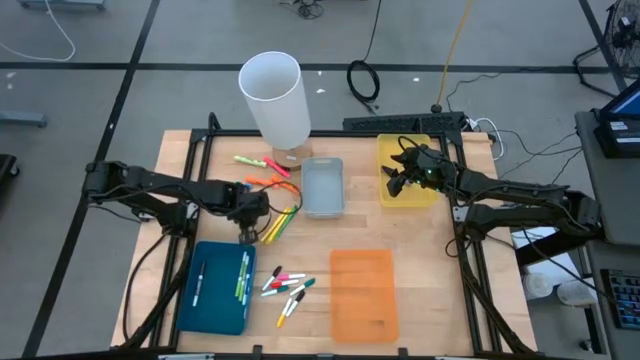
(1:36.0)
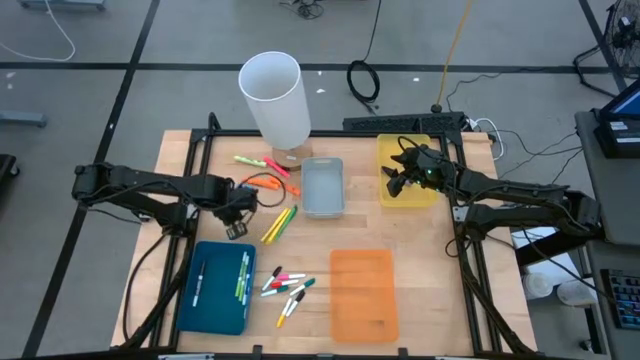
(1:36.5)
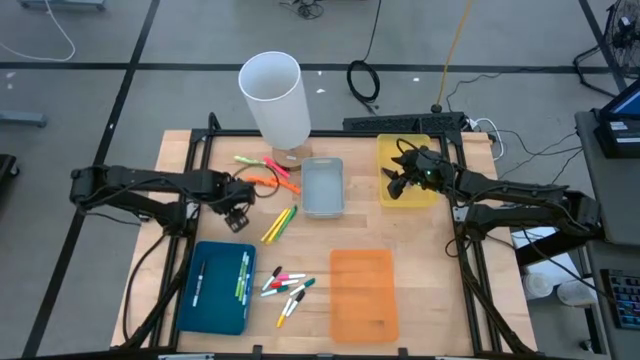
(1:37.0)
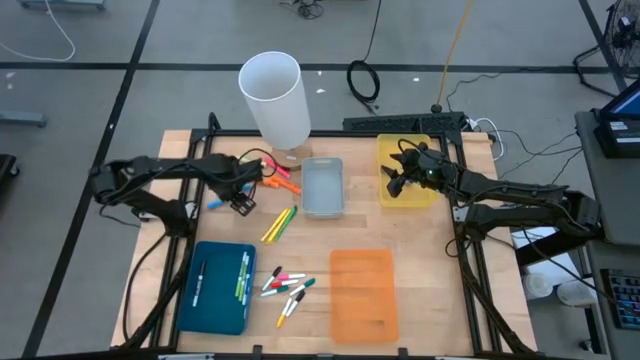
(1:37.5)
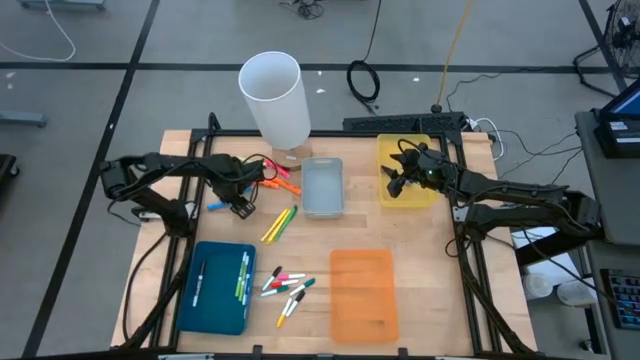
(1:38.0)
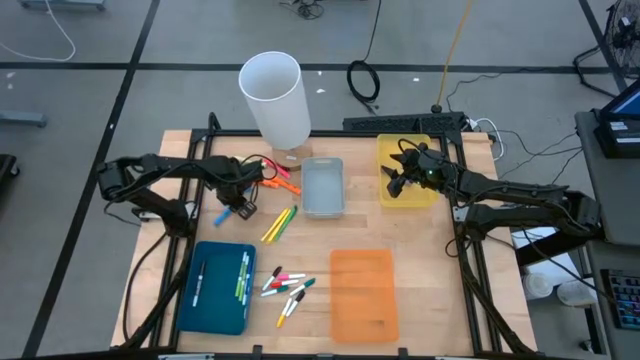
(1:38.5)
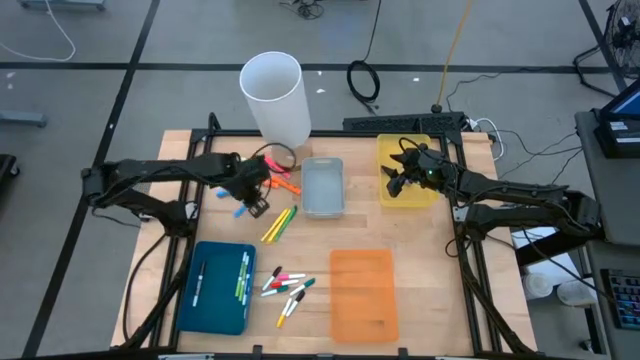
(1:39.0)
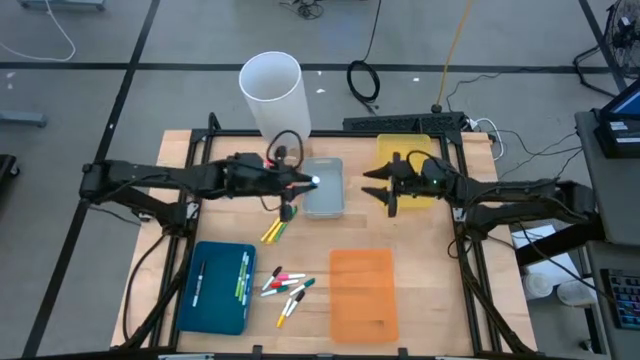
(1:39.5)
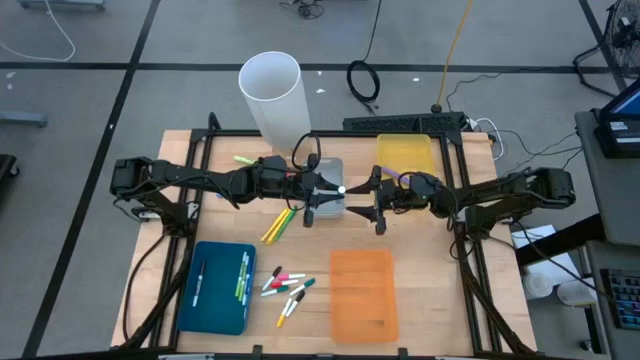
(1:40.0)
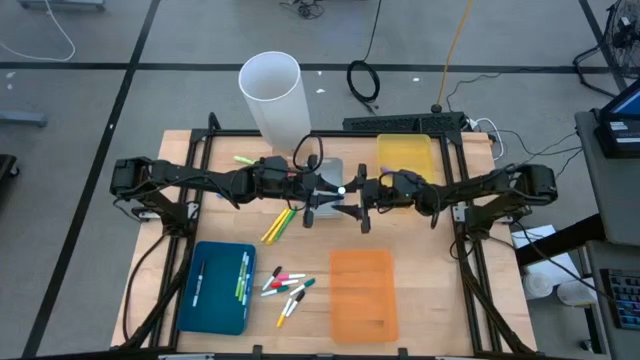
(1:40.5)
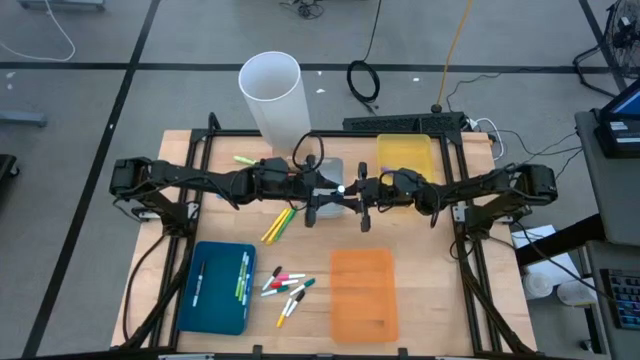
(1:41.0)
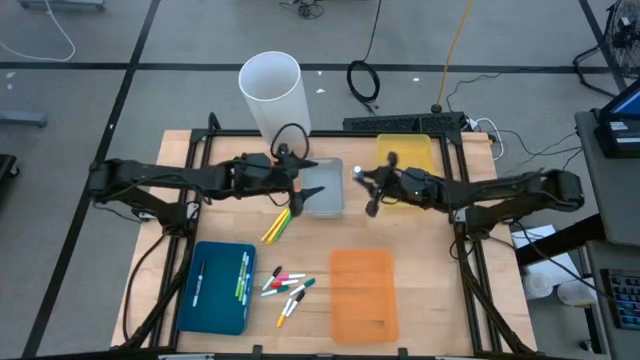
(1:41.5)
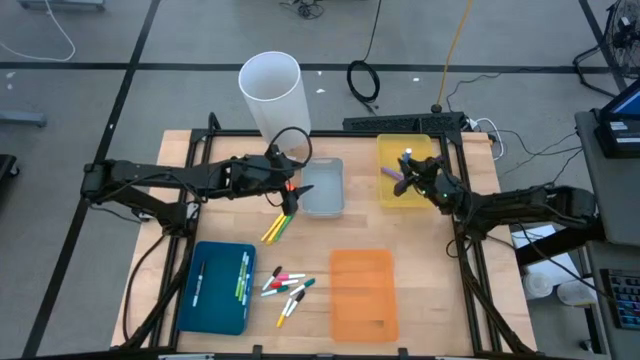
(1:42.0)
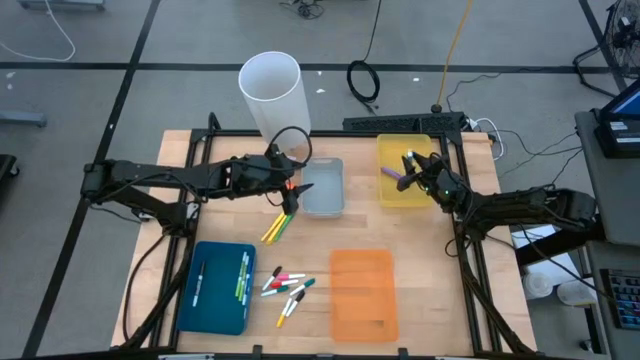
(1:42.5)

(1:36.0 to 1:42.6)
Task: Pick & Place Markers
Put the bottom large blue highlighter pen in the yellow bin

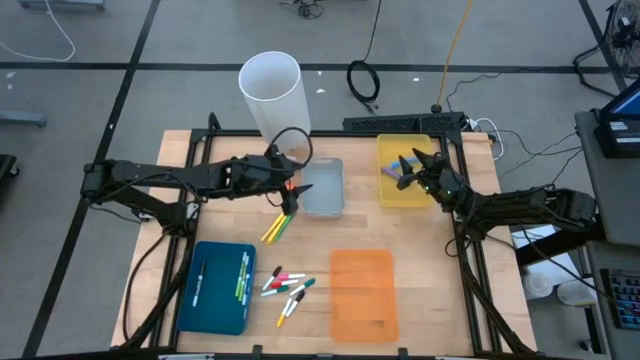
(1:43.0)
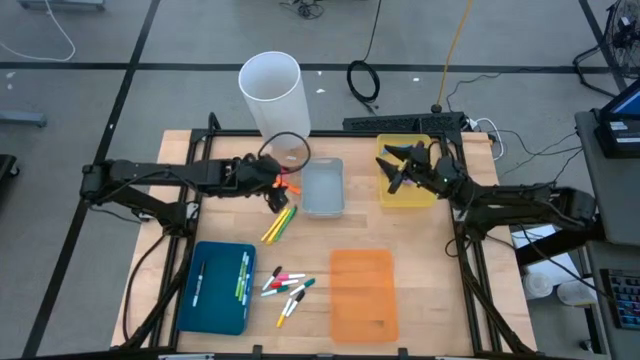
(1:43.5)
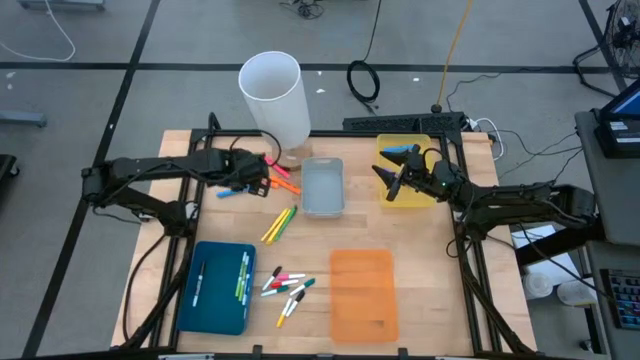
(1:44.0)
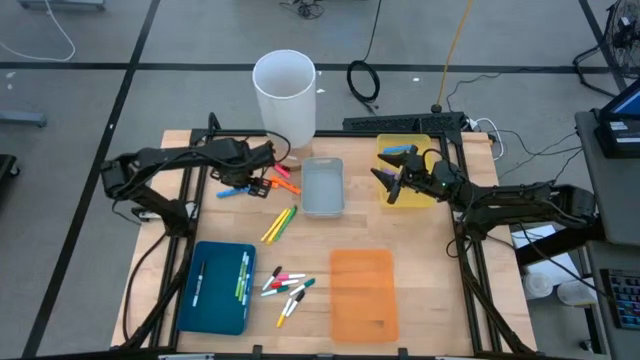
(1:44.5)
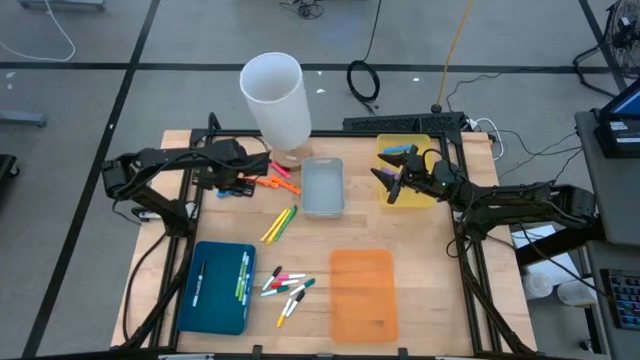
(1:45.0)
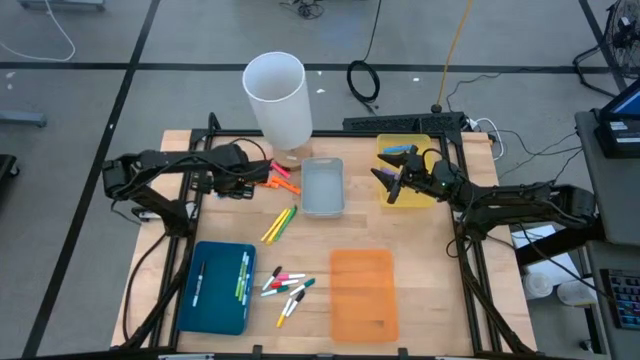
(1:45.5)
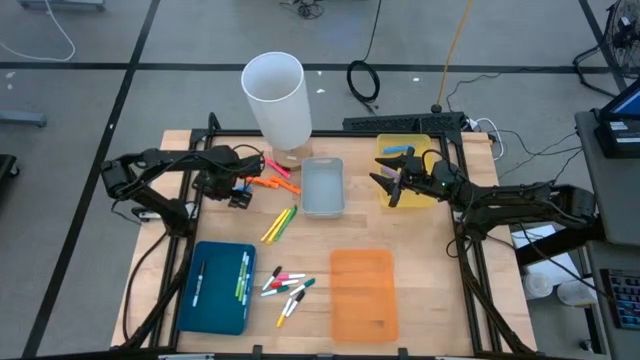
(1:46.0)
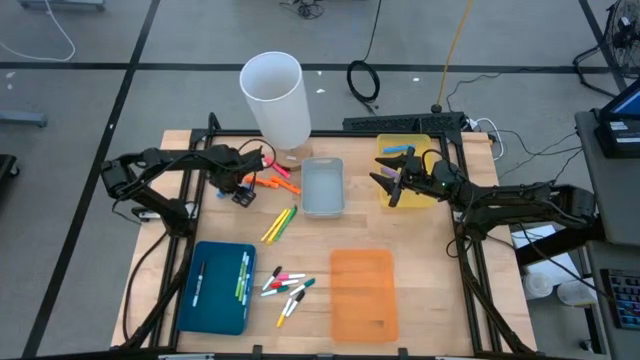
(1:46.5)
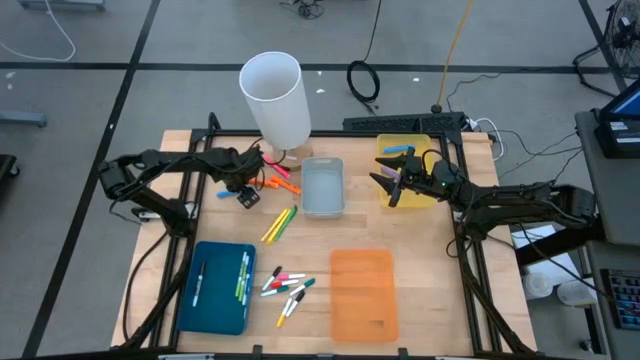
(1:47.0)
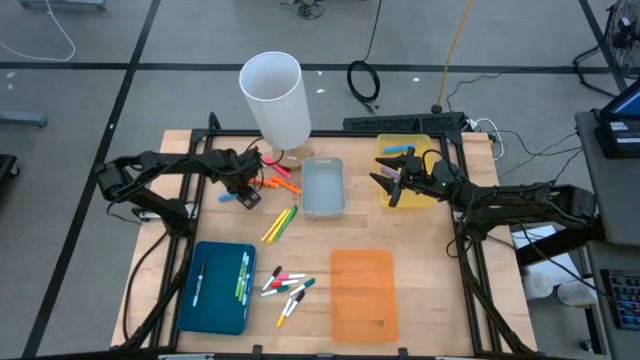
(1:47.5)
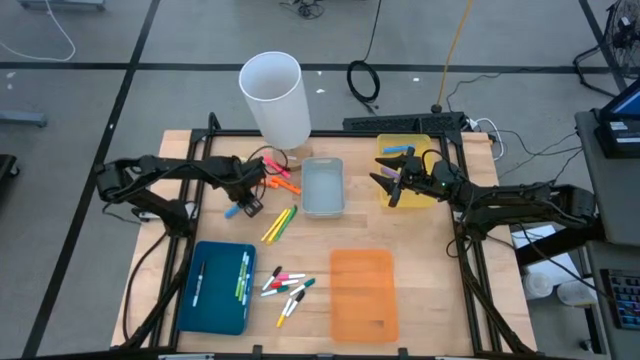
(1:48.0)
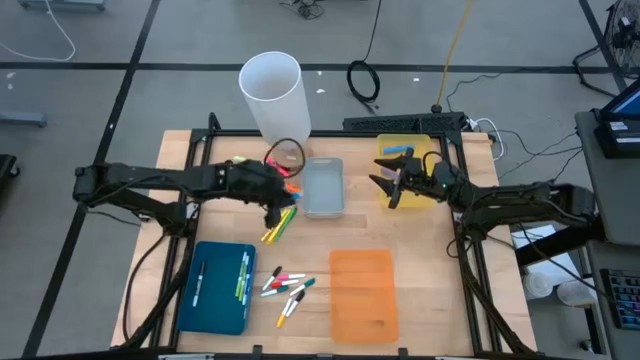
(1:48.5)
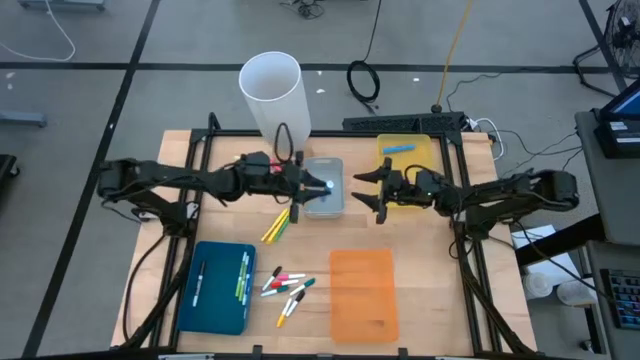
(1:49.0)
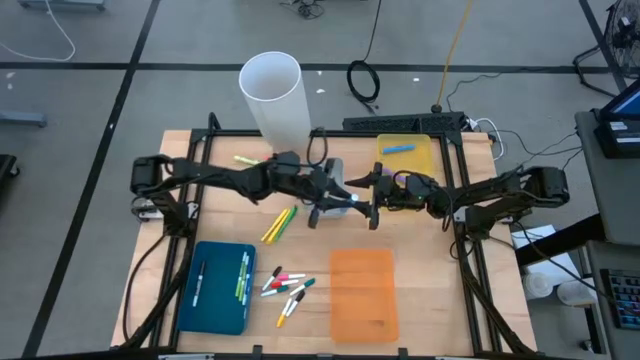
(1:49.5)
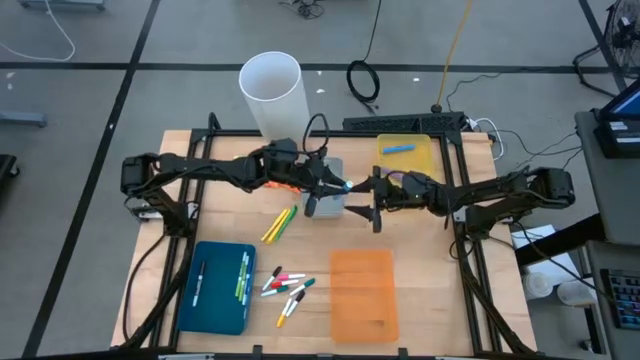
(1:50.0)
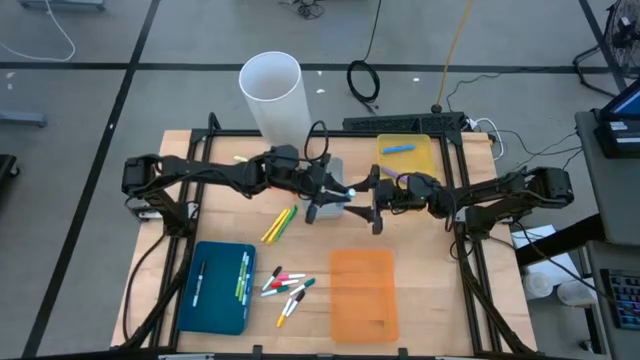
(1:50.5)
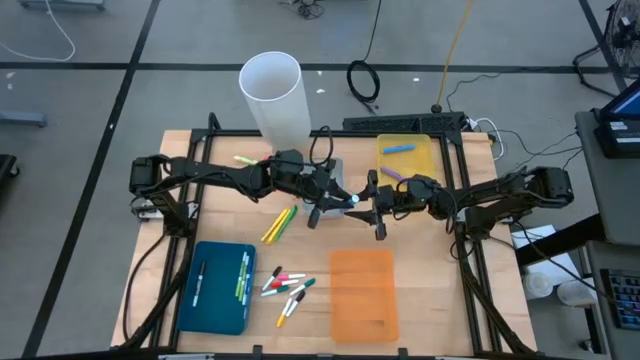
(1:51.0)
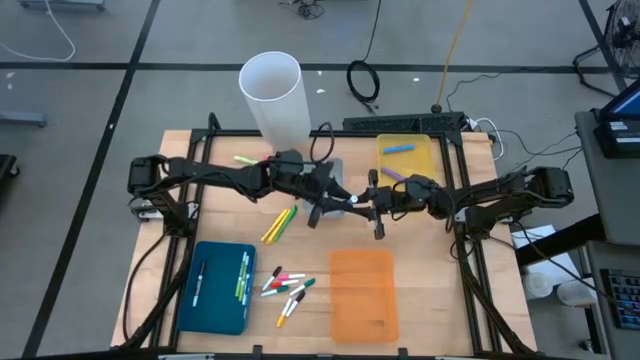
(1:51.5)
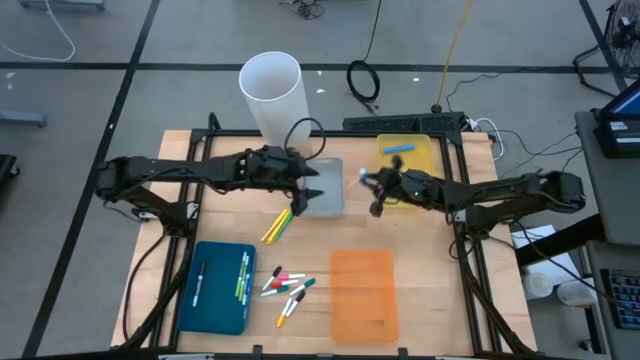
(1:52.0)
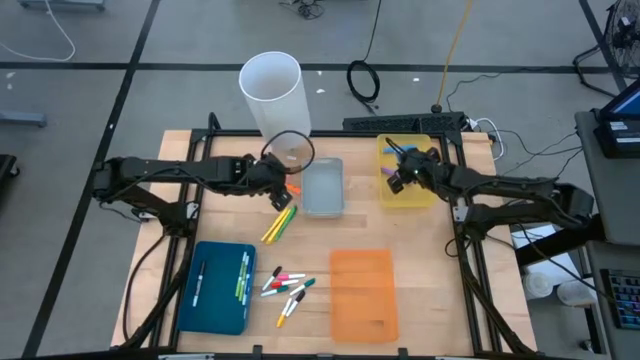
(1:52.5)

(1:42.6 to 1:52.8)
Put the large blue highlighter pen in the yellow bin

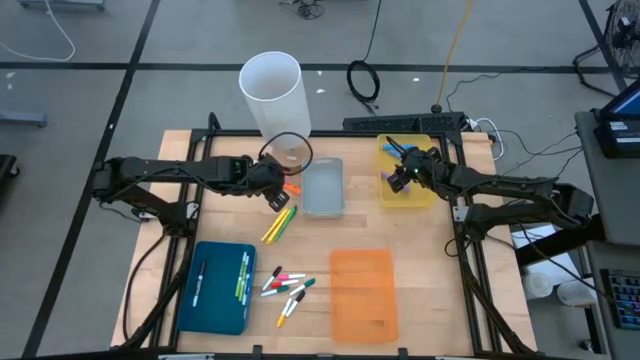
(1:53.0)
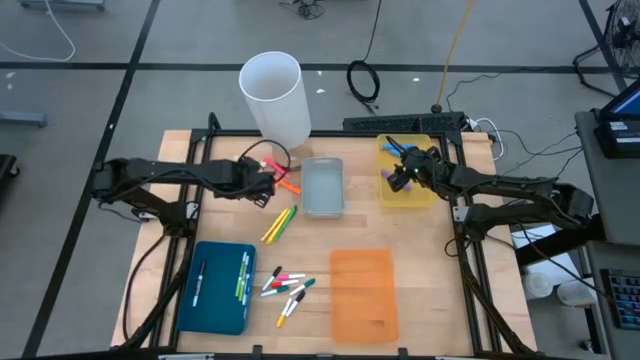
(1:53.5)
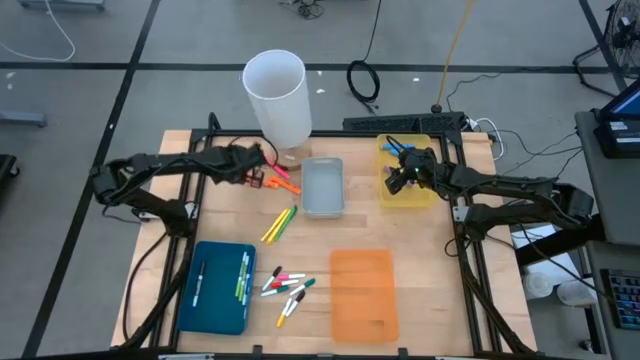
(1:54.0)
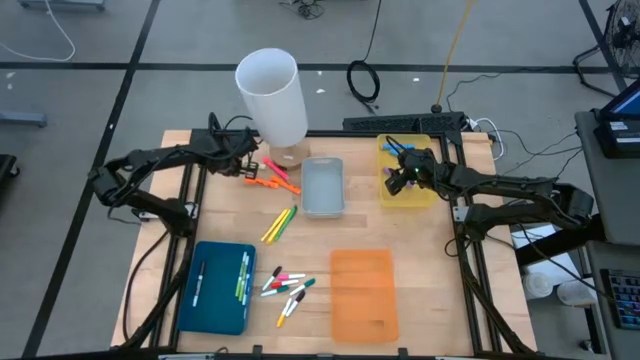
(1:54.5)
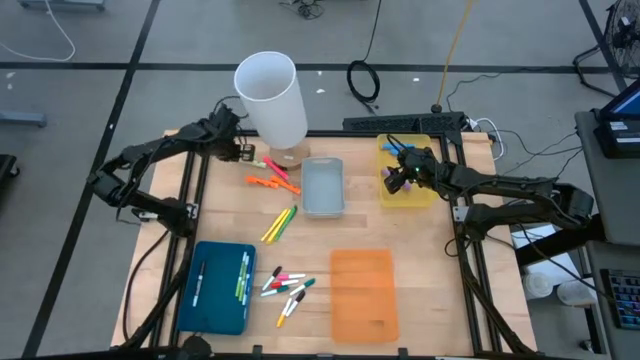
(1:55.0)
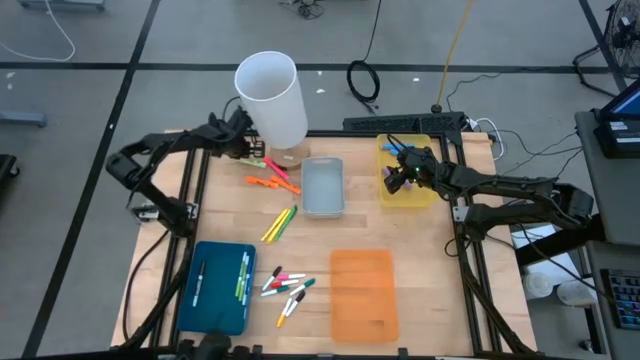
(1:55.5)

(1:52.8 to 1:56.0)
Adjust the green highlighter pen

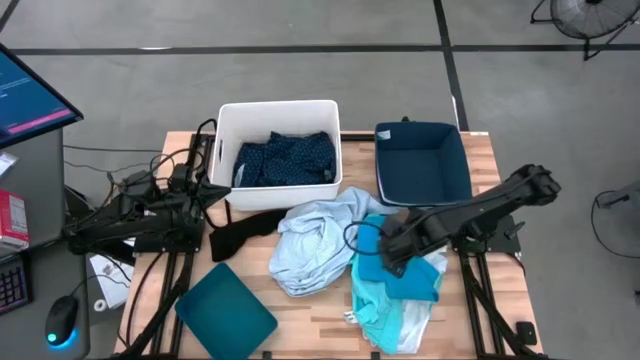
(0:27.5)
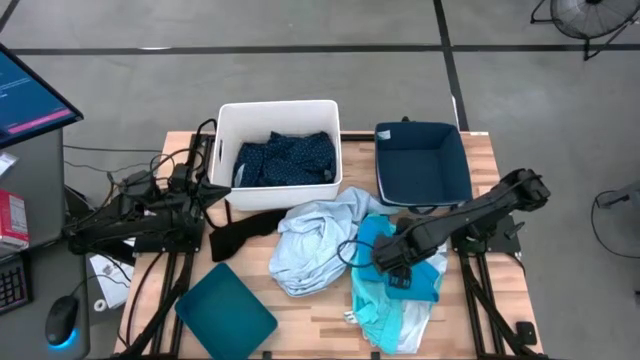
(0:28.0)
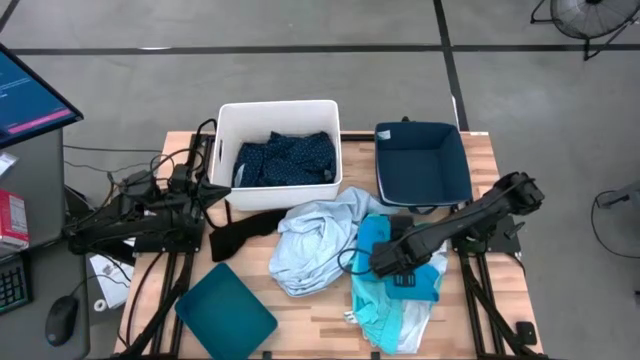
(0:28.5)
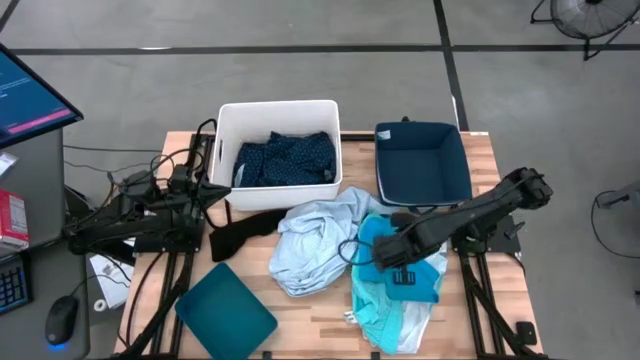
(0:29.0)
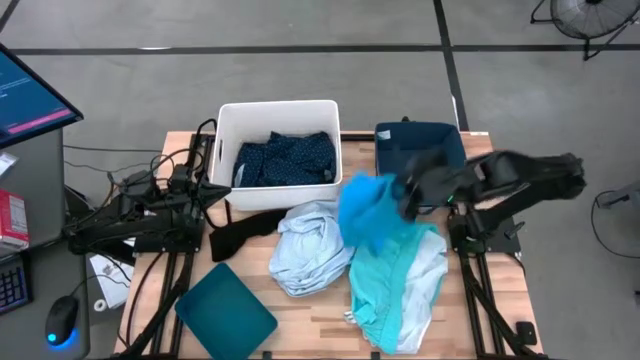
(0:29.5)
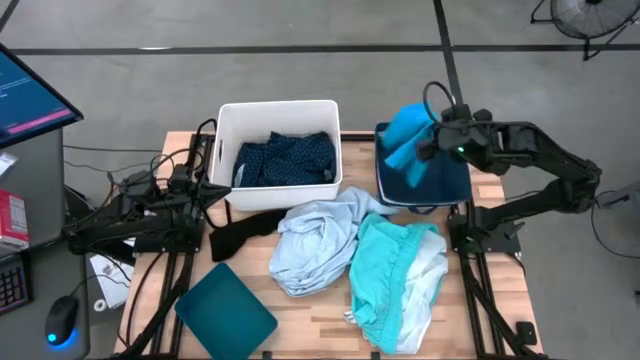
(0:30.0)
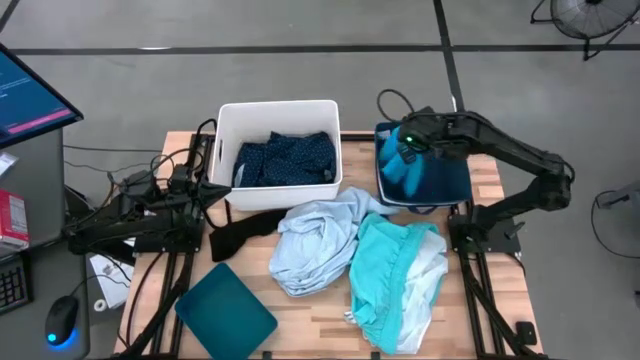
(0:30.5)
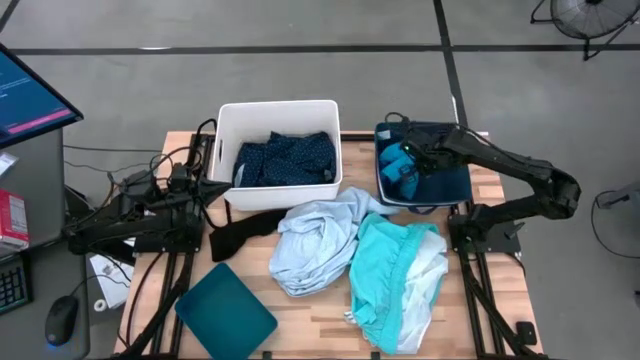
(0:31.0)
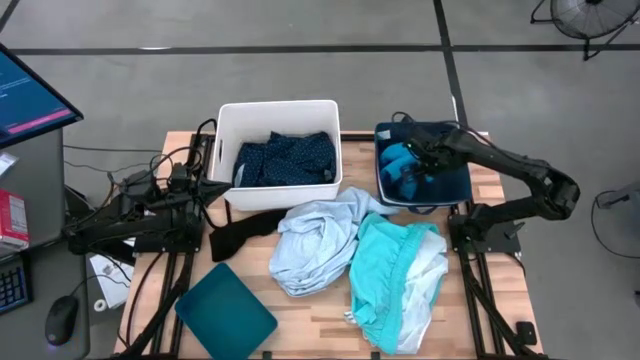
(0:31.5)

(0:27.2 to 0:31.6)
Task: Pick & Place Cloths
Put the blue shorts into the dark blue laundry organizer
